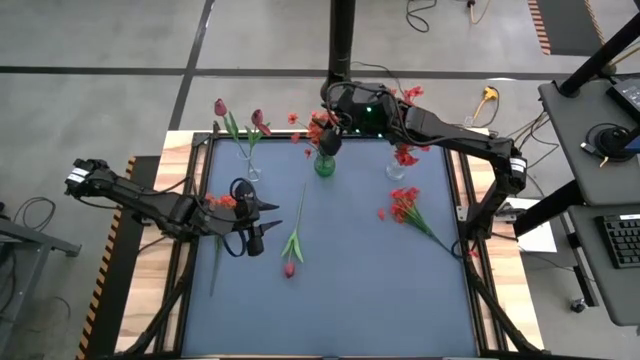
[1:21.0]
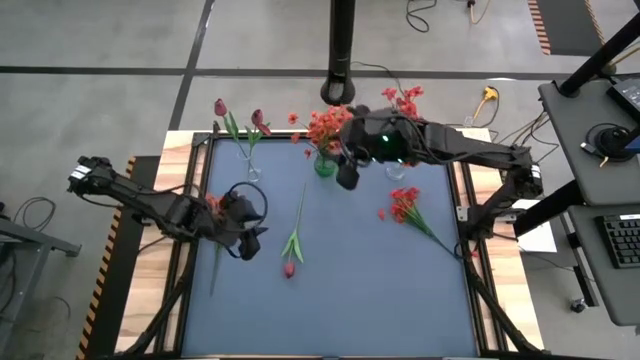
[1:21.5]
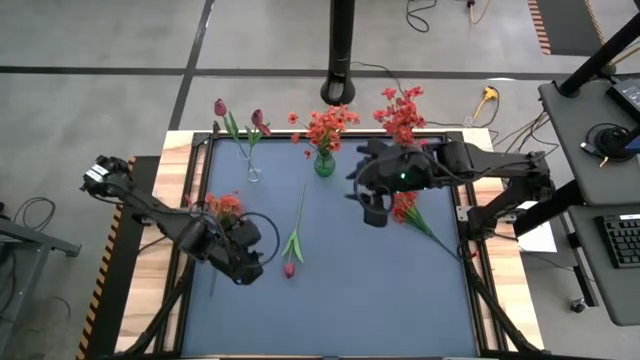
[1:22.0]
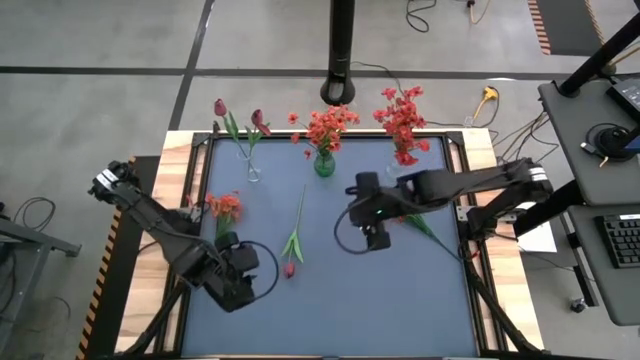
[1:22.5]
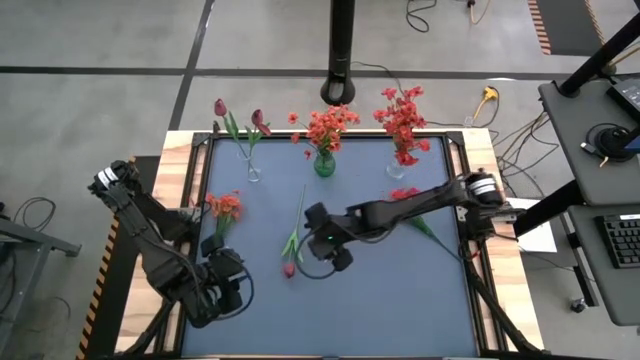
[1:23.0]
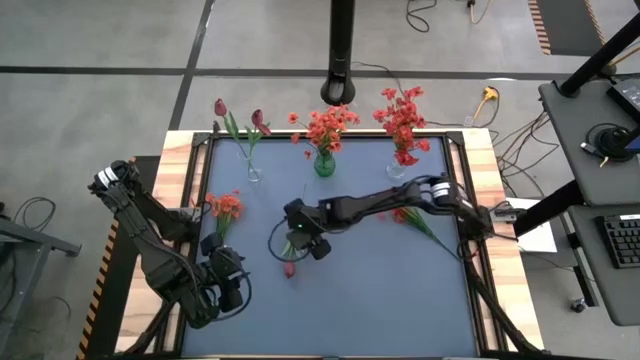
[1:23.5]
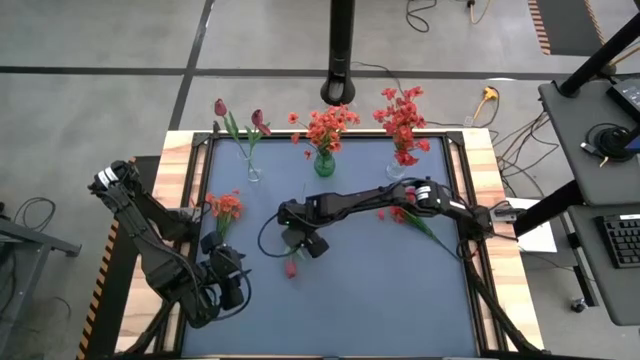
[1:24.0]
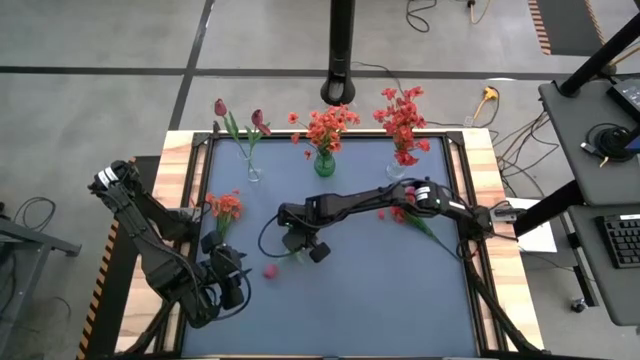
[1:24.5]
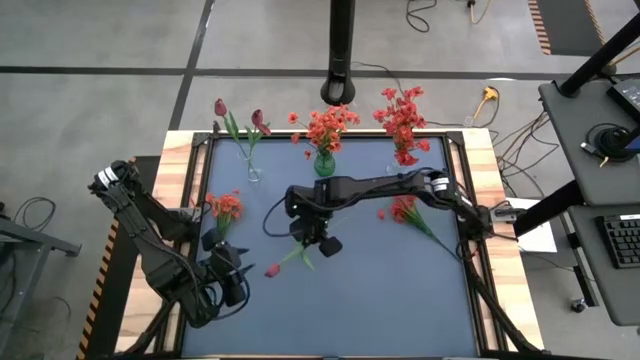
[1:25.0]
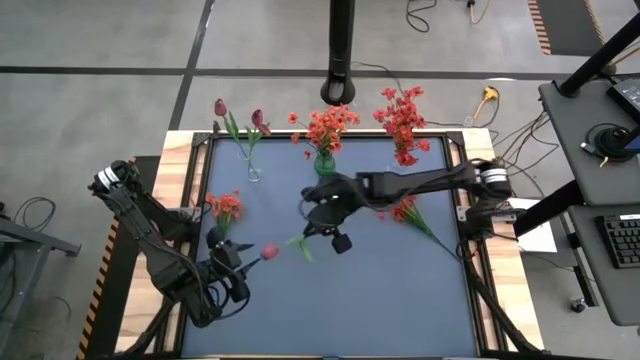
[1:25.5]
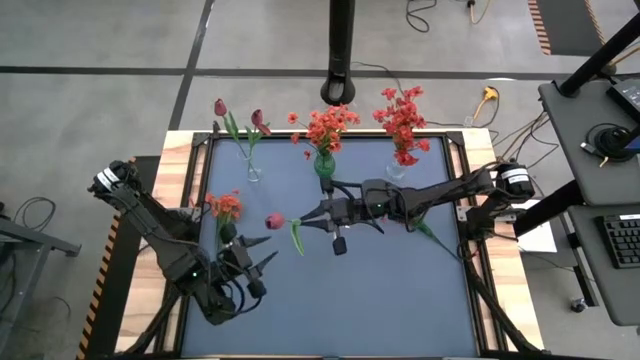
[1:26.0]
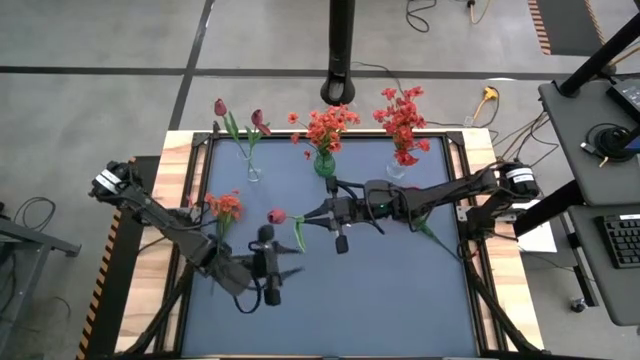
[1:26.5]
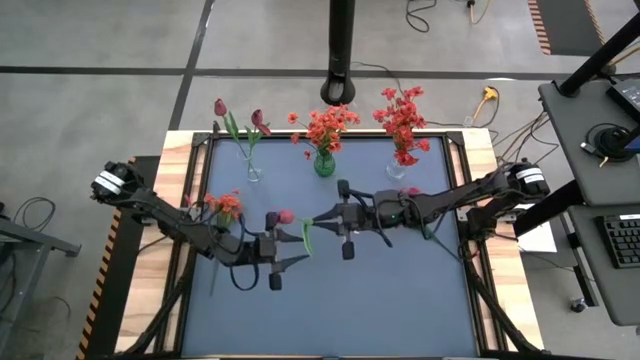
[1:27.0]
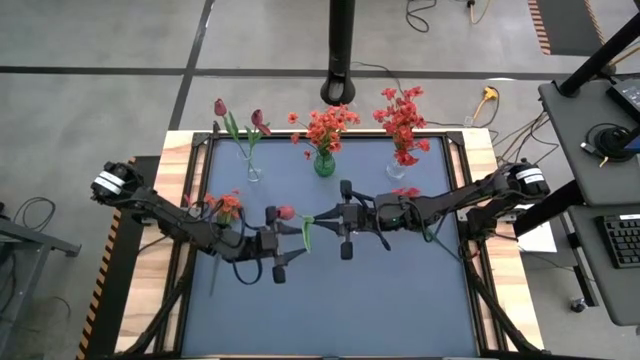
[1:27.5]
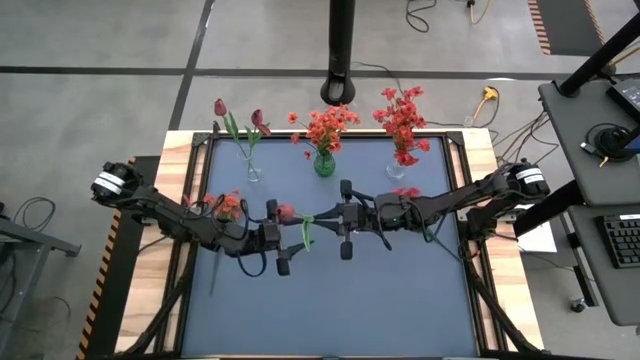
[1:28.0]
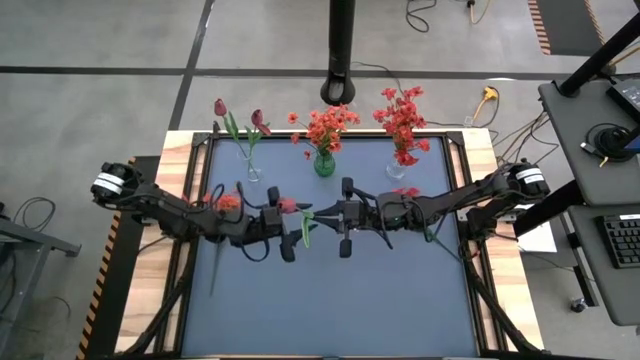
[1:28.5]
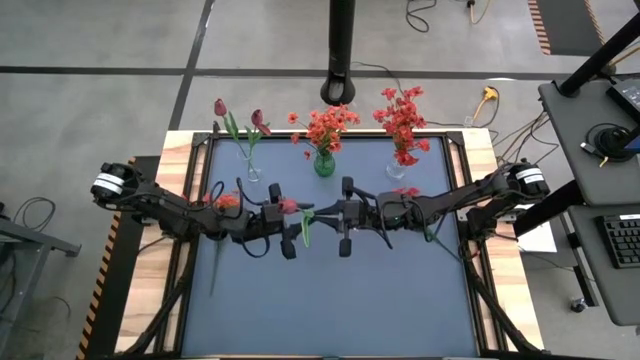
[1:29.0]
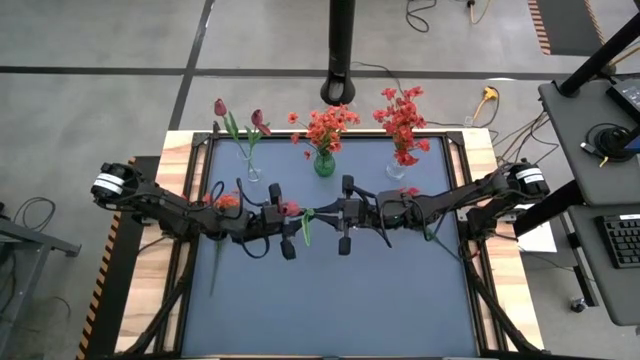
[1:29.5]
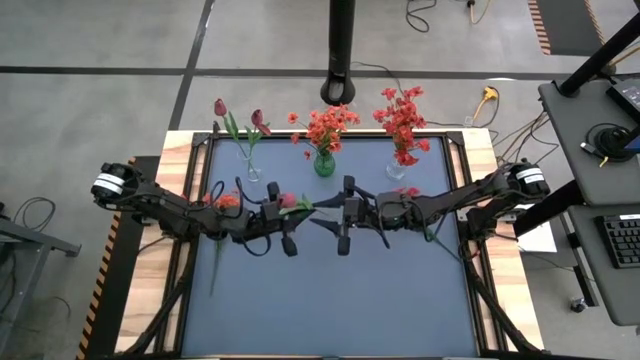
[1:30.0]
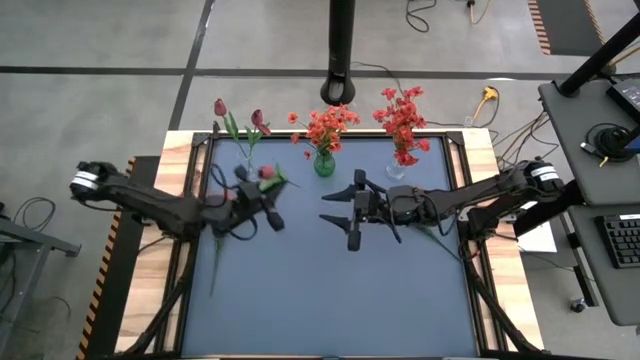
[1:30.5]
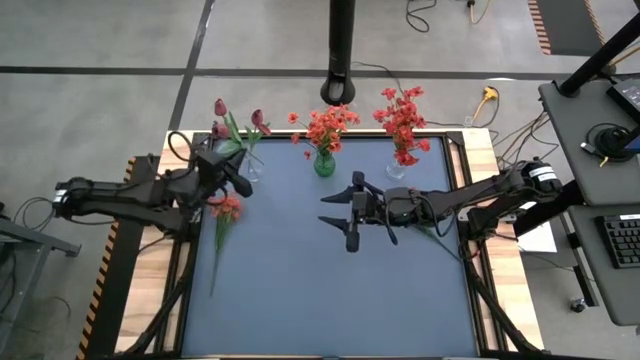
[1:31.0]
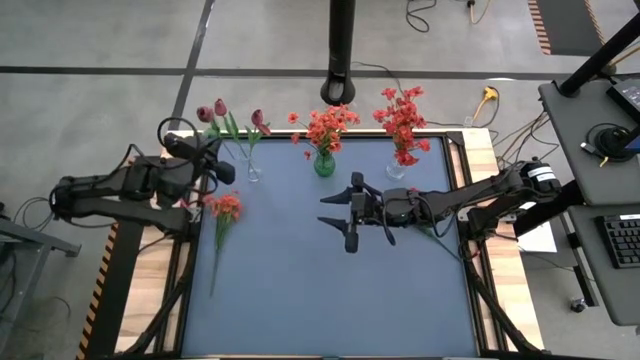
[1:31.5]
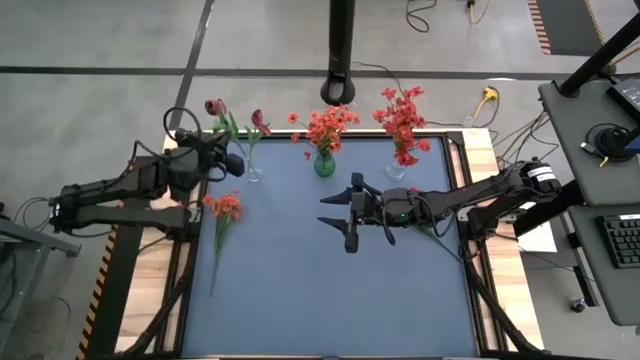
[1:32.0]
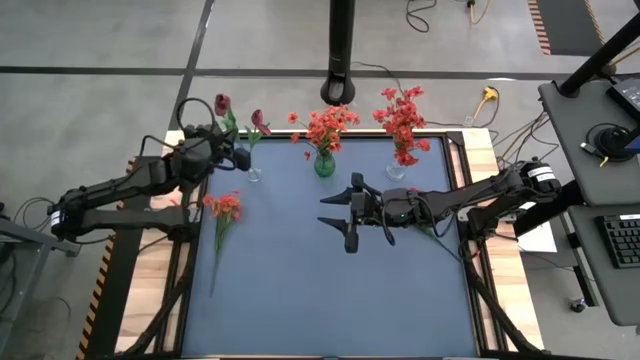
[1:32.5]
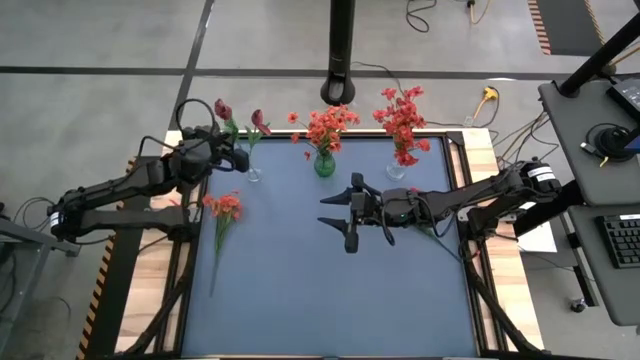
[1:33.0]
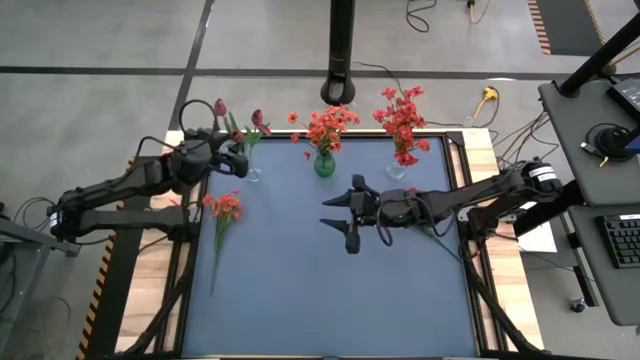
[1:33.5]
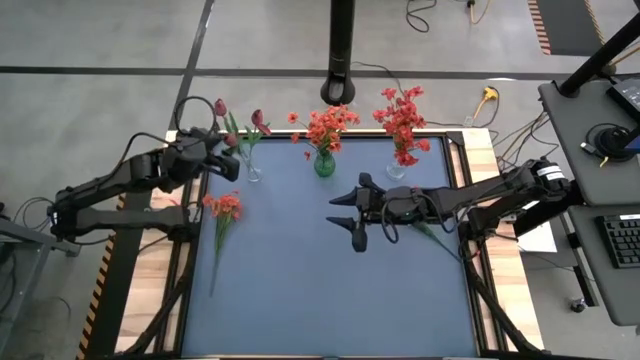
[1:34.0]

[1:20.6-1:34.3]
Task: Sort flowers into vase by color
Put the red tulip into the left transparent vase

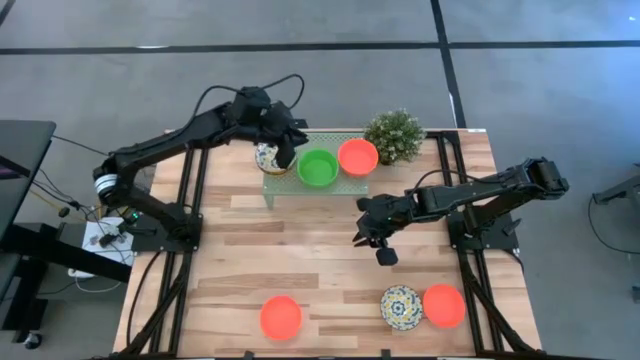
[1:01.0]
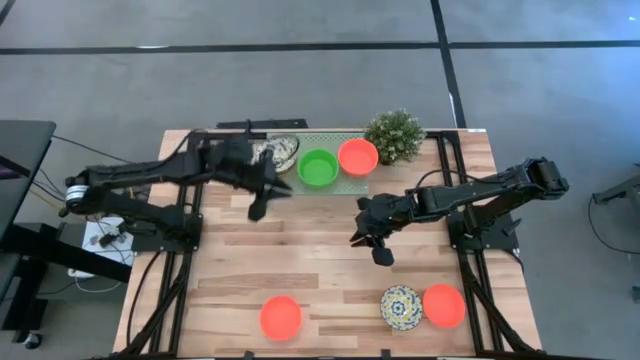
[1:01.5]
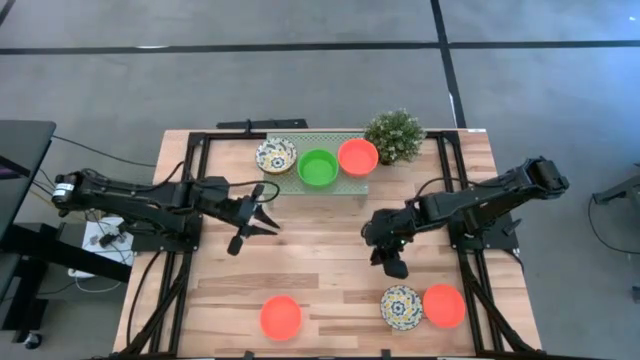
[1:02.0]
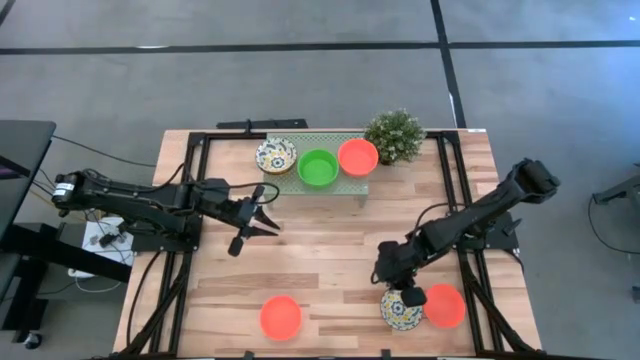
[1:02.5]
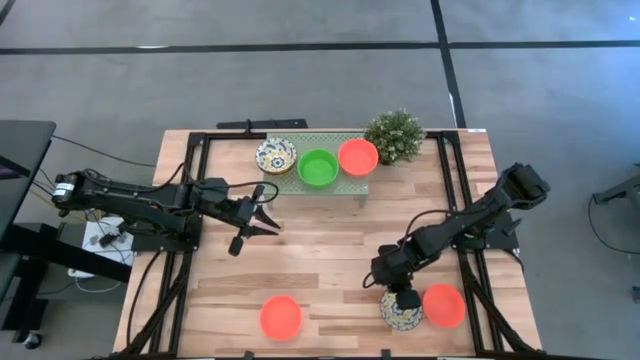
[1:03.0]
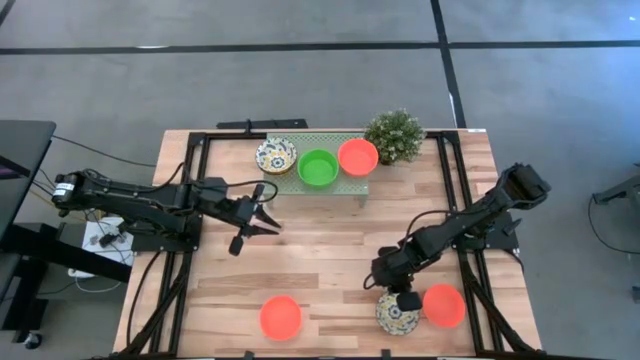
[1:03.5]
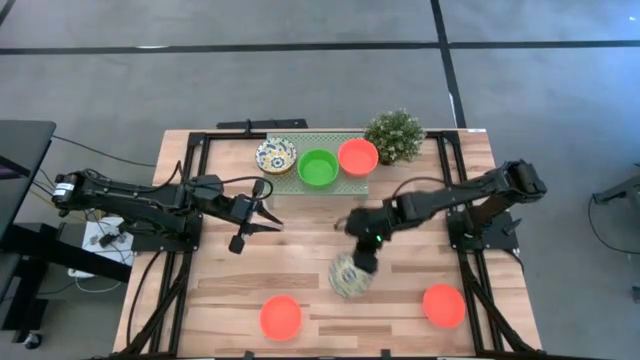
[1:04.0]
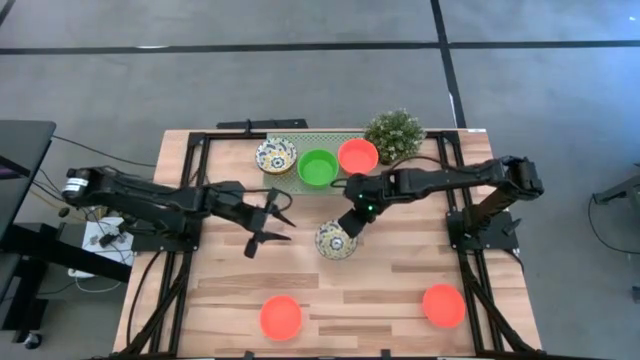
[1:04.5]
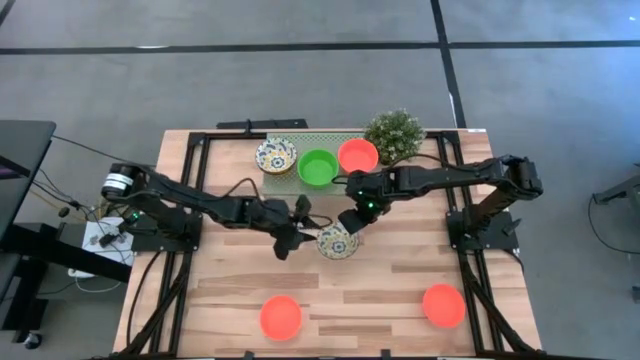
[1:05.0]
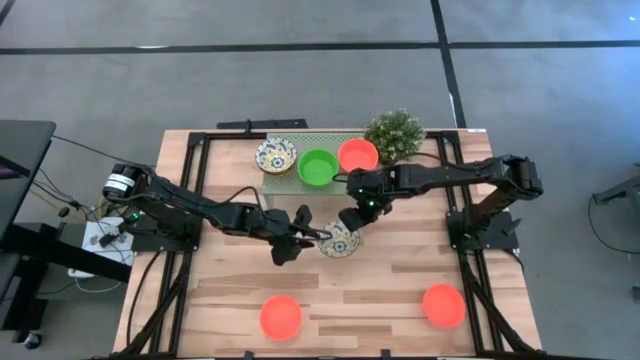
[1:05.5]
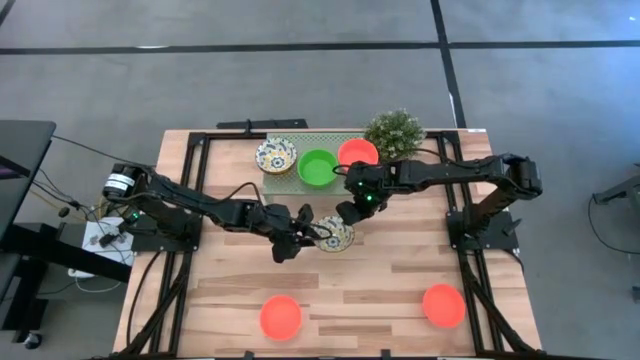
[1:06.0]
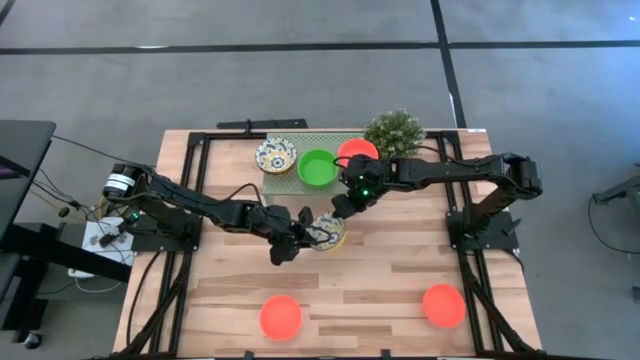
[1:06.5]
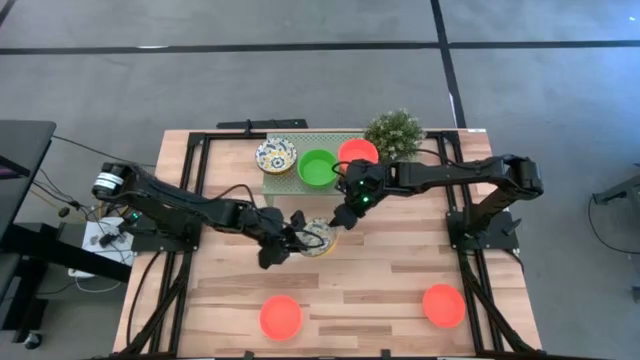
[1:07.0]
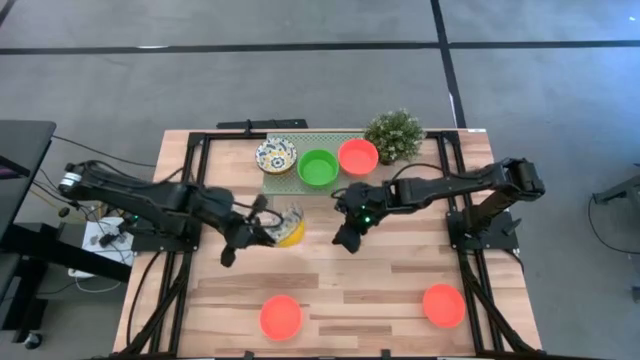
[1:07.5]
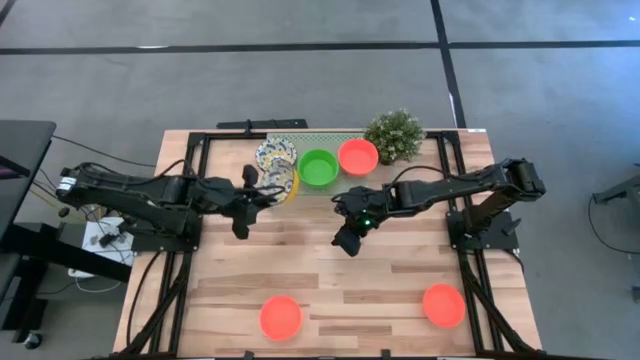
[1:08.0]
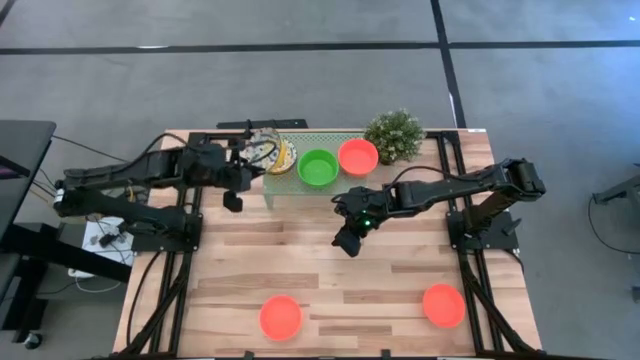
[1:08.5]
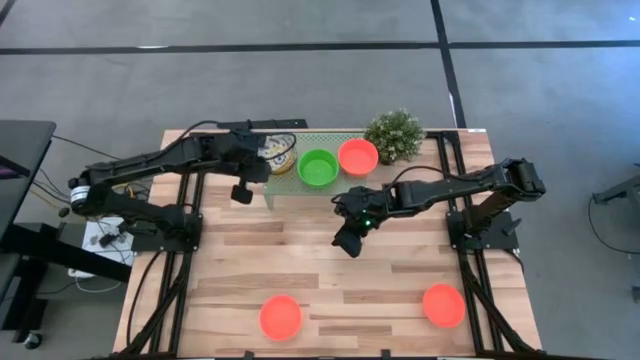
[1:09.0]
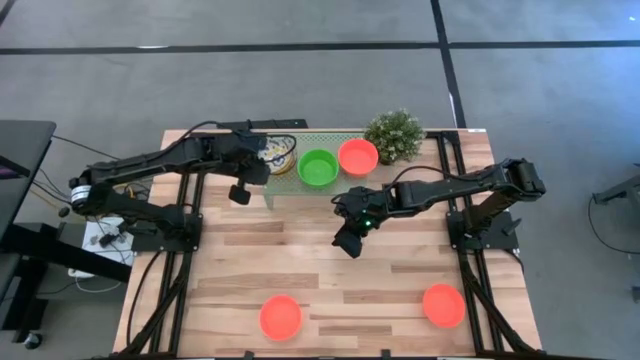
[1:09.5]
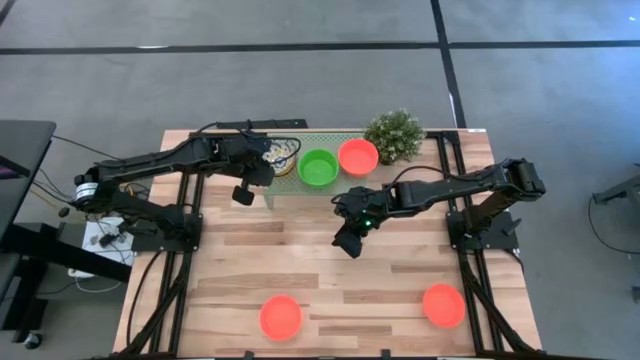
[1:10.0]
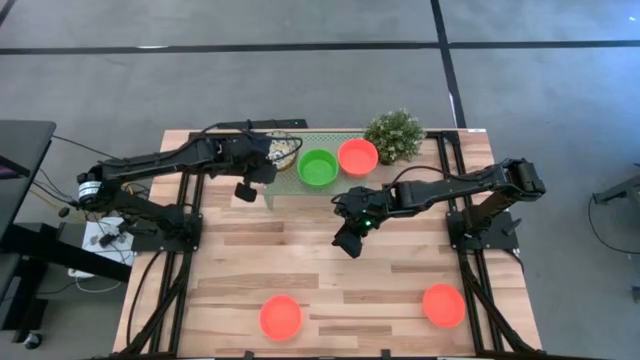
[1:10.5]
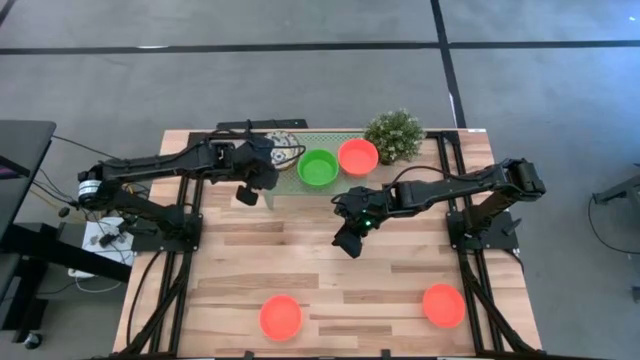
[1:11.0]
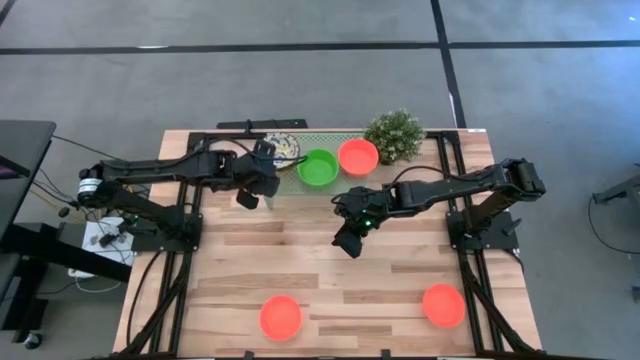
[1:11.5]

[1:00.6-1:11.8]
Task: Pick & Place Mini bowls
Stack the white patterned bowl on the white patterned bowls on the shelf
